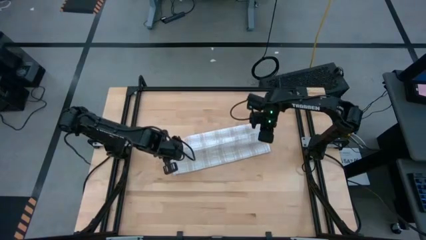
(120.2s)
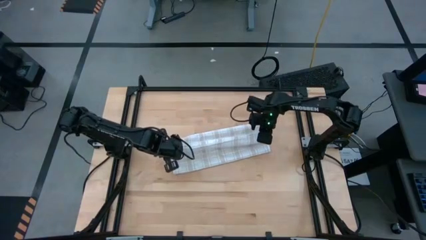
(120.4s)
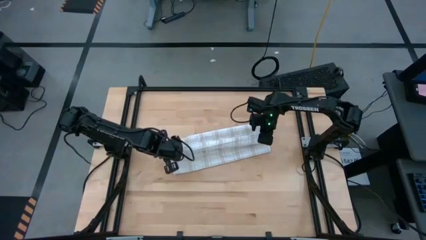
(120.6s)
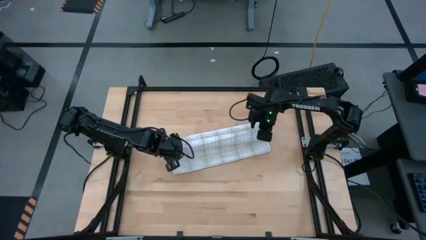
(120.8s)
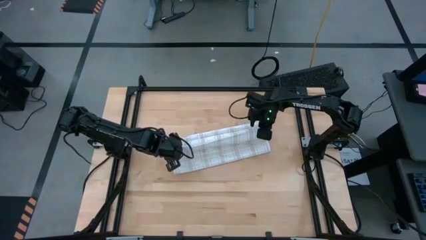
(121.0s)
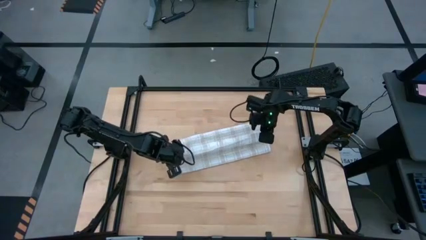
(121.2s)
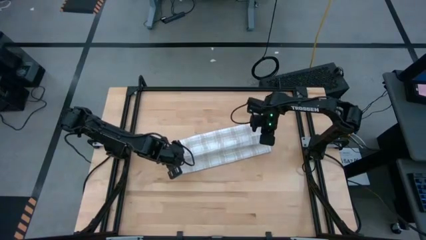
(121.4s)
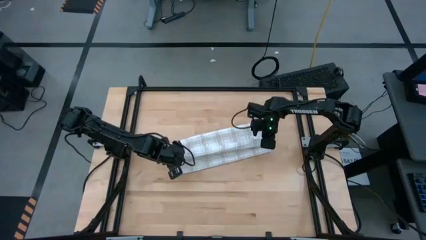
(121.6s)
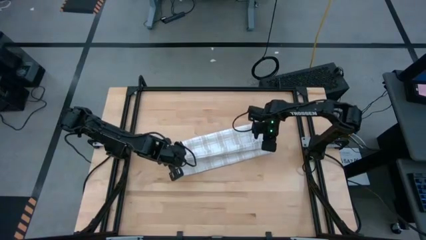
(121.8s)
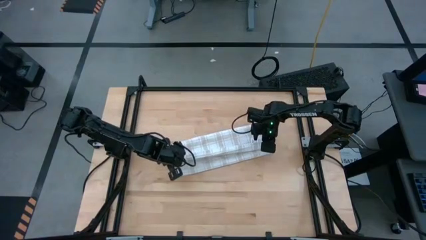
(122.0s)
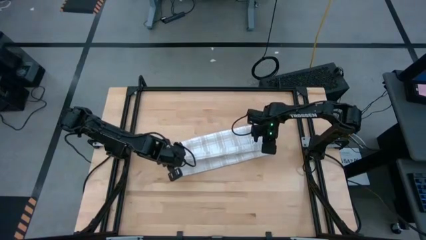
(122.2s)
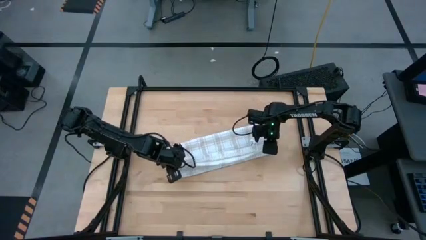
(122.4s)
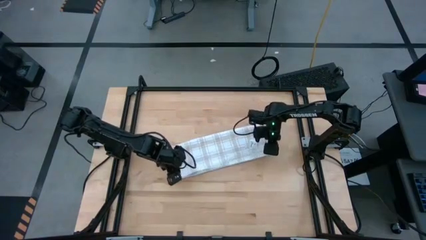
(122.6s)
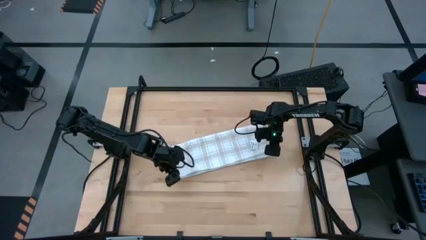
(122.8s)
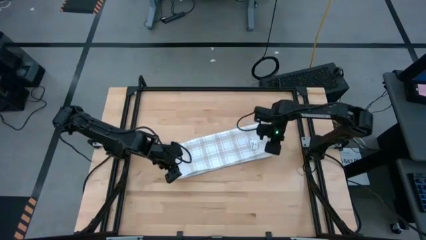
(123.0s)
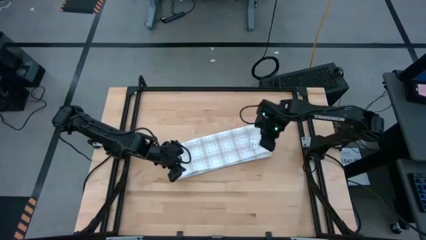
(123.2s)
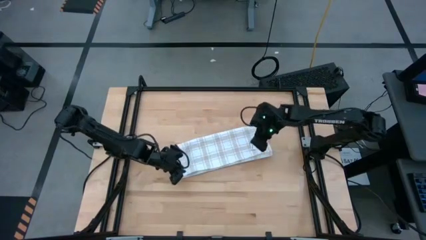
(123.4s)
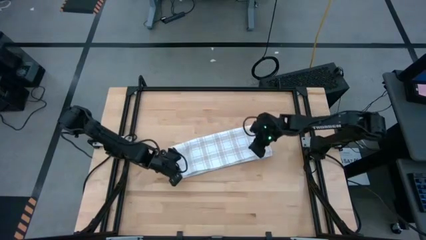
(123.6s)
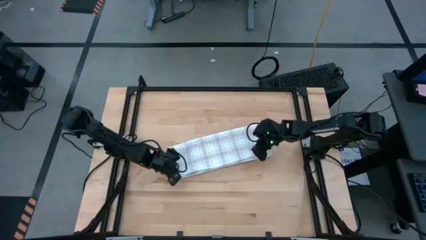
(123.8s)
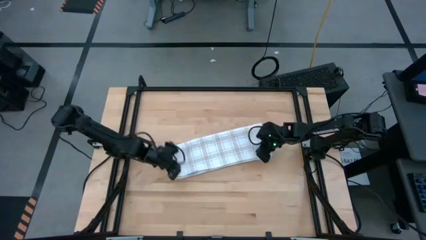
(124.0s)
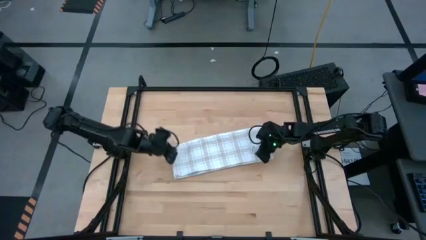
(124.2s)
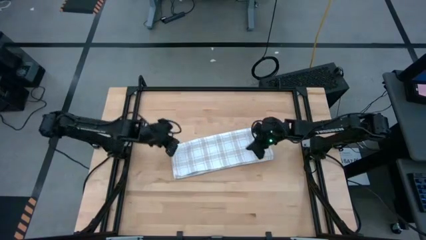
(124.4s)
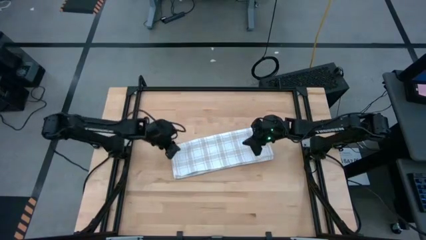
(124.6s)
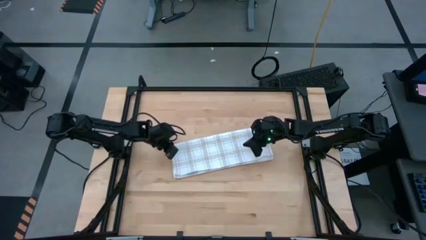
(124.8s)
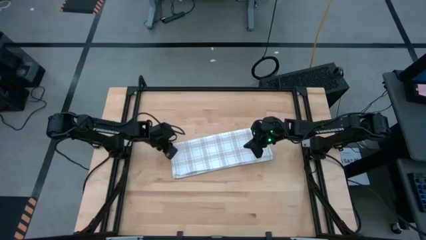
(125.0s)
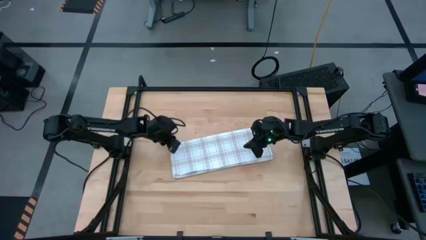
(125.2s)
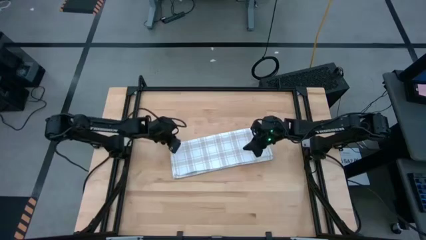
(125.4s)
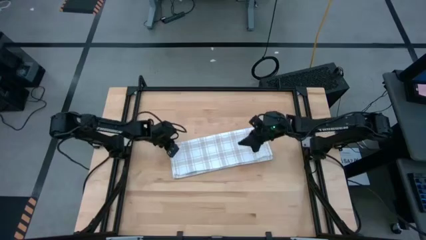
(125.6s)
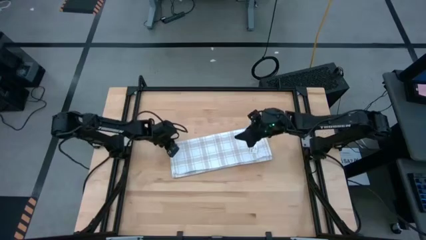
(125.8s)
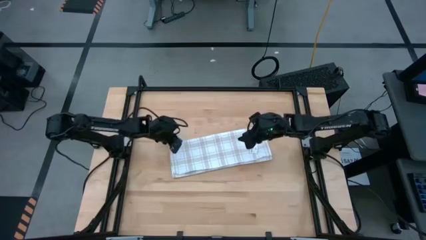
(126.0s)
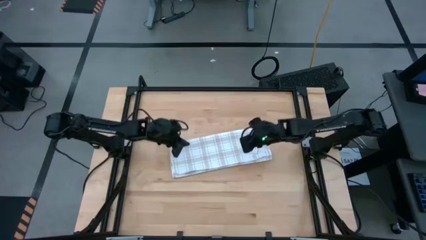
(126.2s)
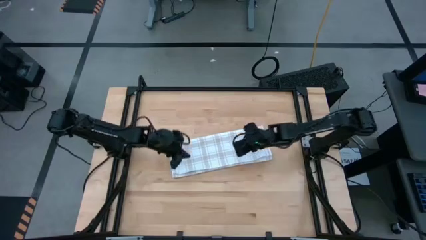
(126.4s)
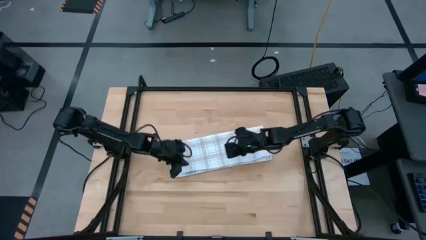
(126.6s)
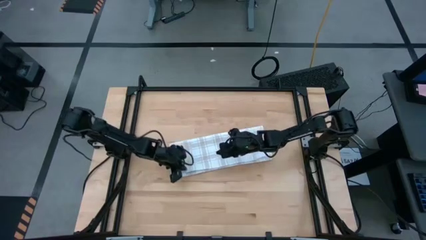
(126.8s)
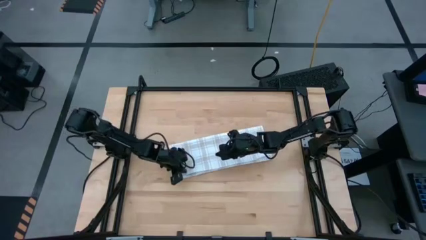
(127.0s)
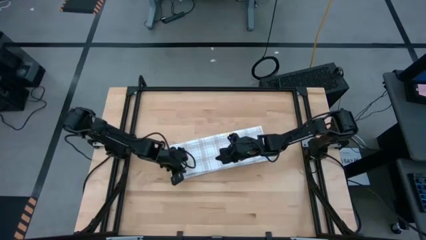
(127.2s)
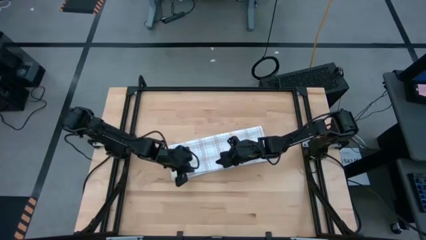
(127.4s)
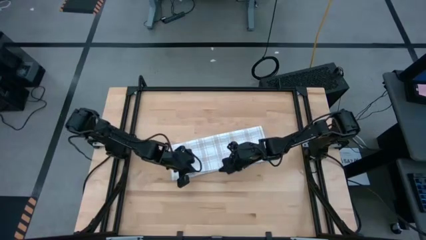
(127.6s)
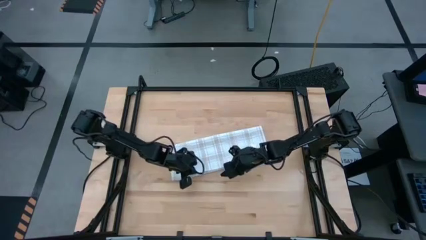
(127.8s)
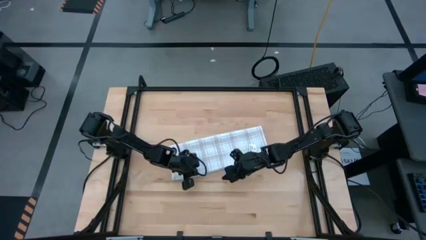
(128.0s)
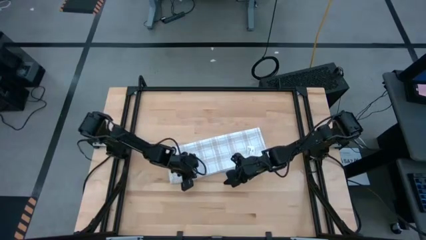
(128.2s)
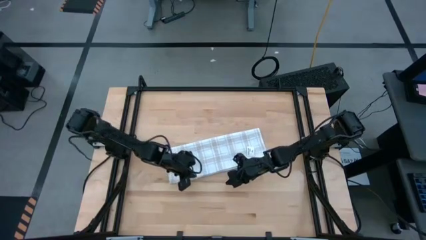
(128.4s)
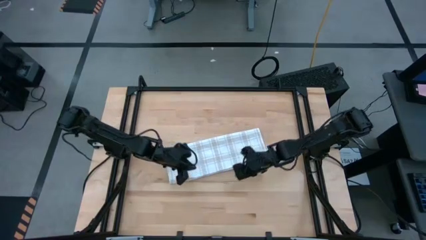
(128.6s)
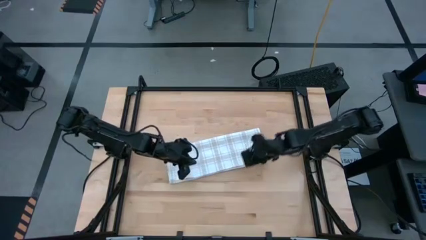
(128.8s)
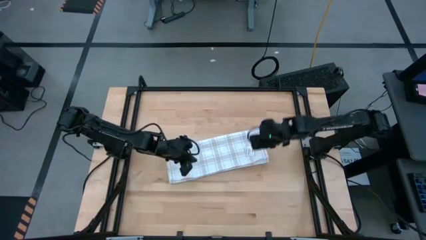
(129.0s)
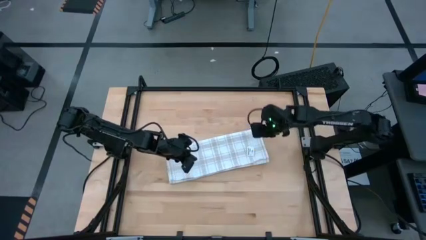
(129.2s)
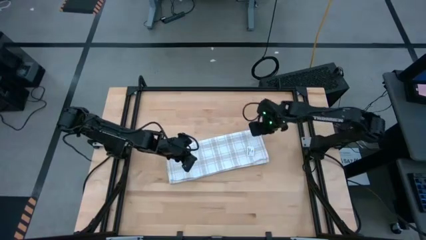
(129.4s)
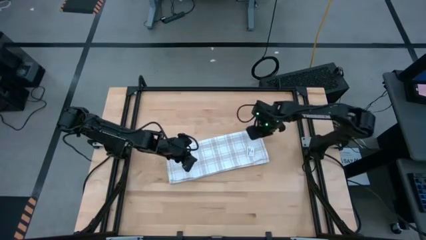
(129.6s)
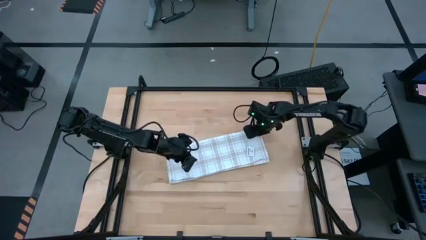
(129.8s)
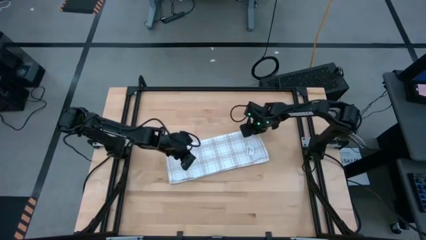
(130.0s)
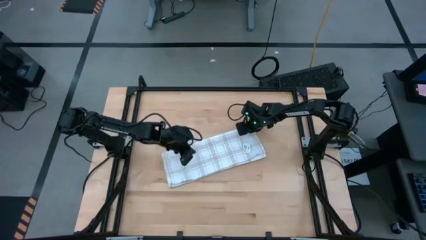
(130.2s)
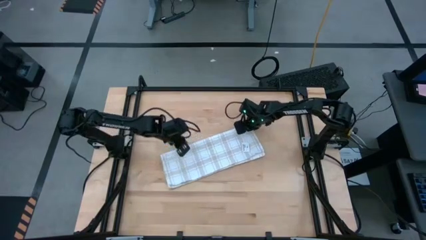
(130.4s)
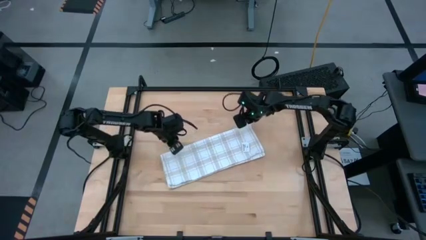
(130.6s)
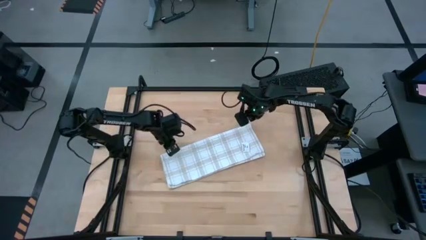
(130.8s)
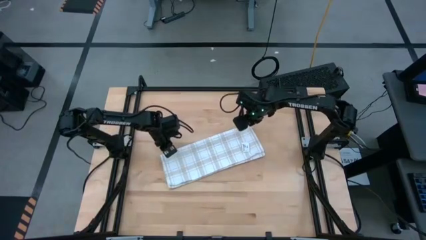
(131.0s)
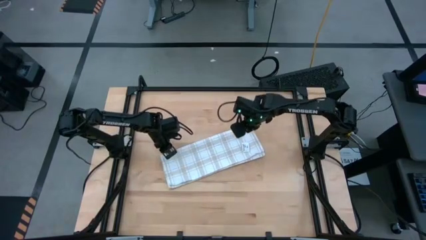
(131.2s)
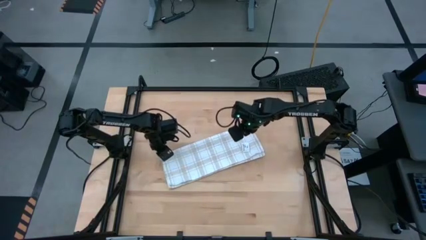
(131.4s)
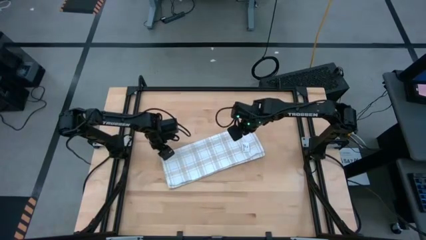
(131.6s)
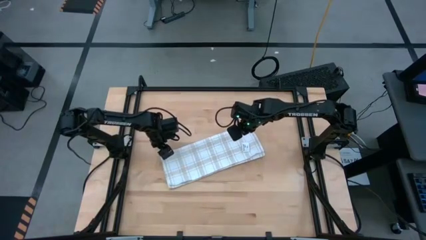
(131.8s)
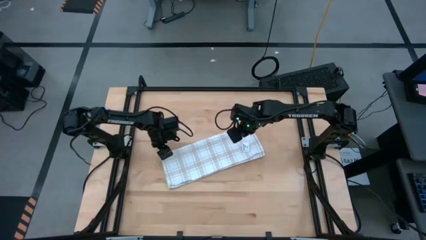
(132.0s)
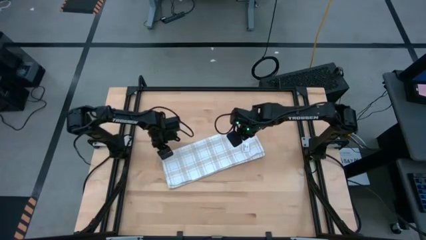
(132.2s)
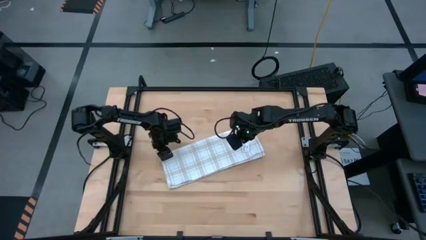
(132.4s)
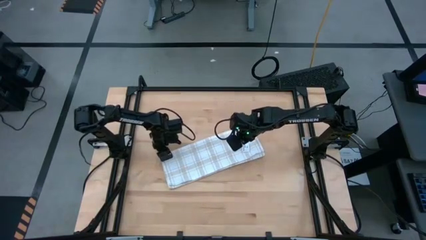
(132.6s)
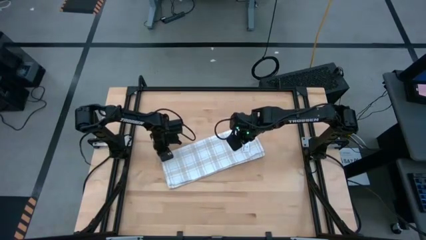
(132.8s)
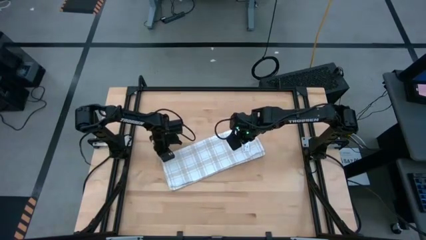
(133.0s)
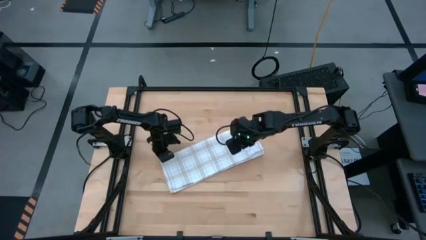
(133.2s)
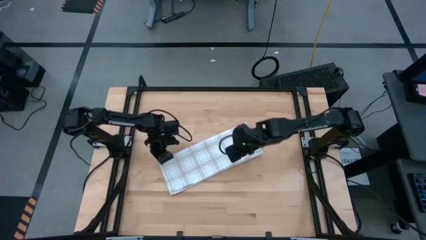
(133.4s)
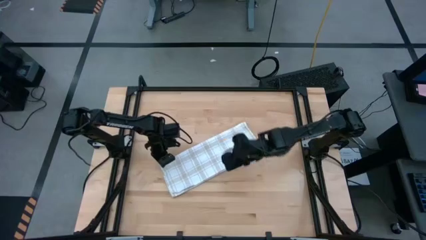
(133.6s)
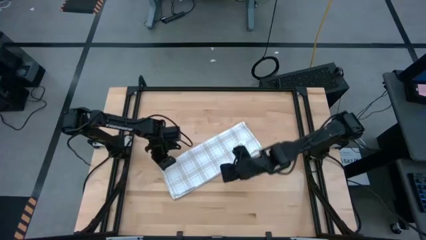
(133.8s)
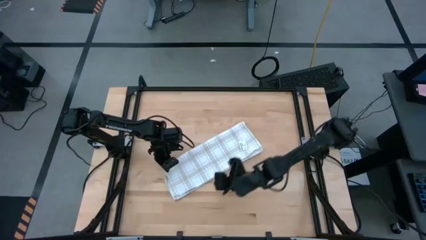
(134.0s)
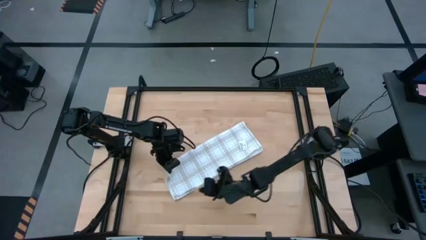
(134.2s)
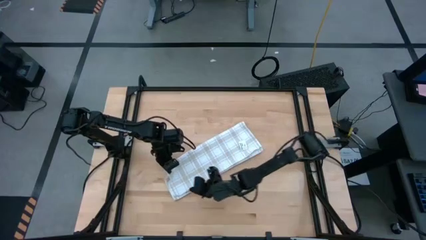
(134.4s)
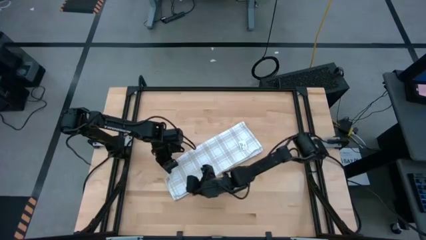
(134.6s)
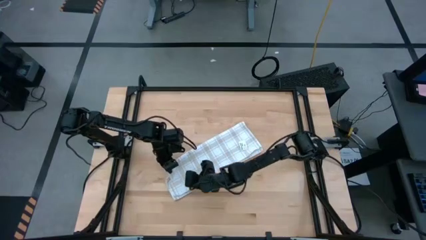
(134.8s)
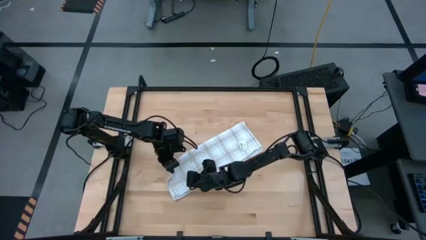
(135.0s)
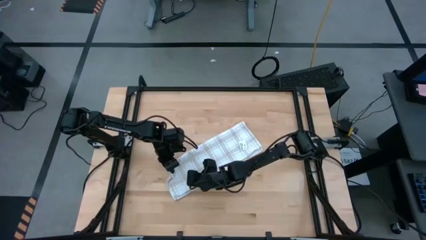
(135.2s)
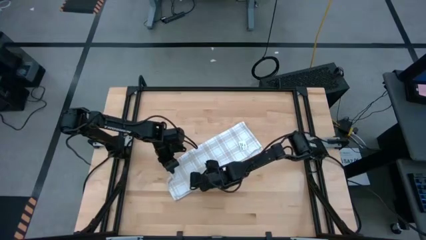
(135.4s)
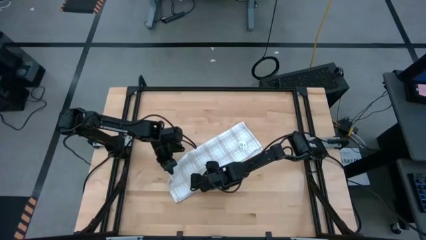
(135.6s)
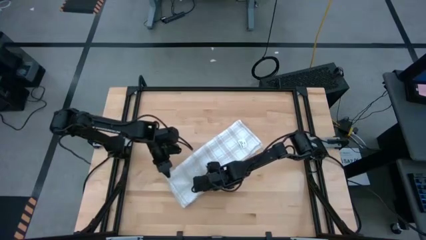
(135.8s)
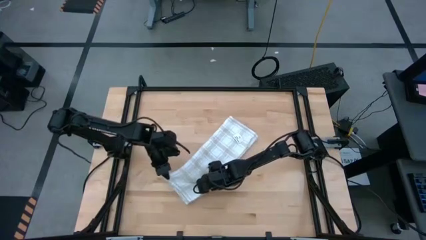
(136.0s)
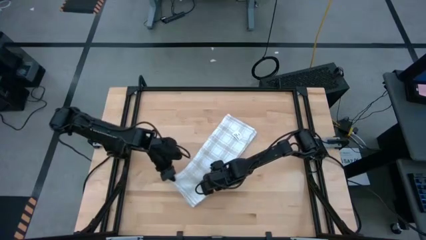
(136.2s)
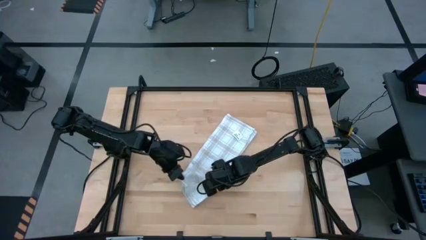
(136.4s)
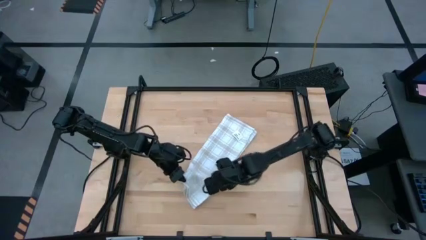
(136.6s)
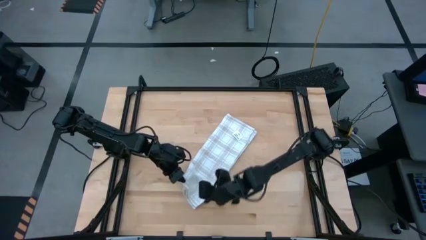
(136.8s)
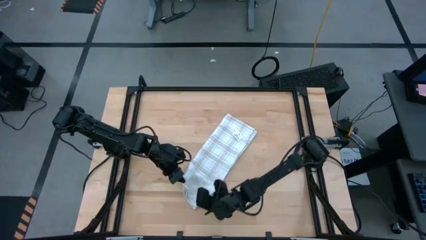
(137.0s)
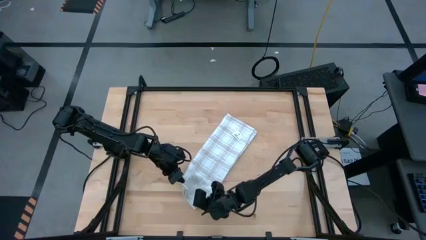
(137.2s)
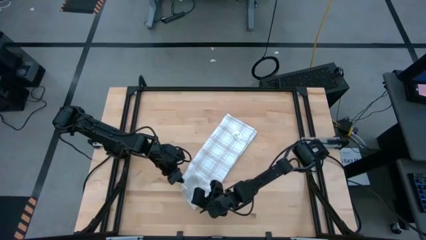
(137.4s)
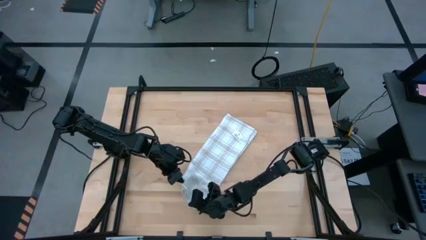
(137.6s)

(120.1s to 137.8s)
Task: Roll towel
Roll the towel
